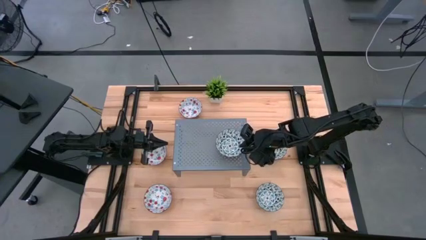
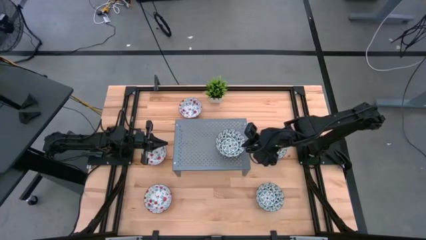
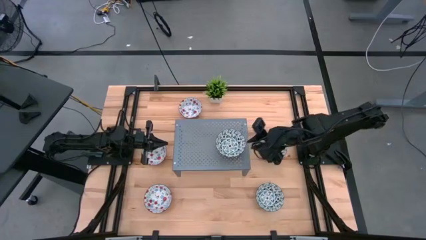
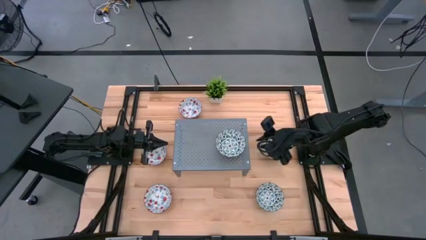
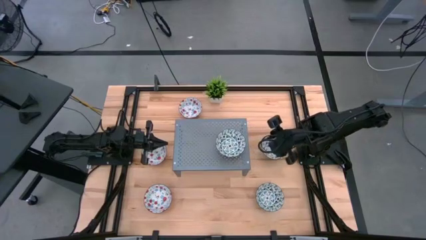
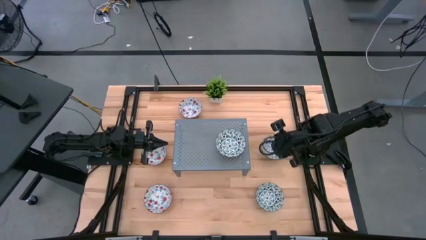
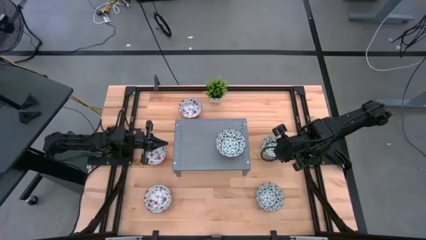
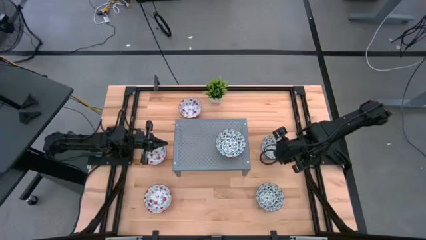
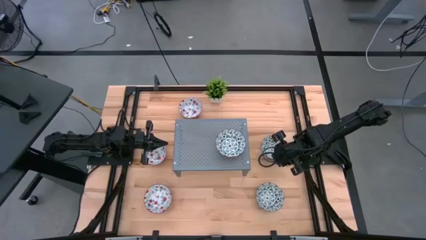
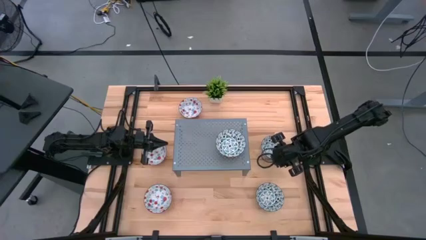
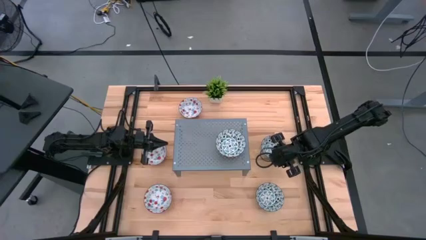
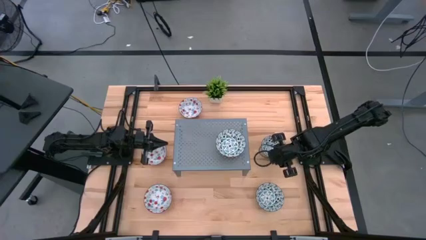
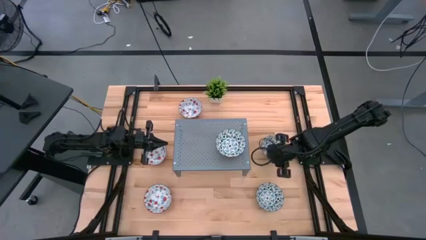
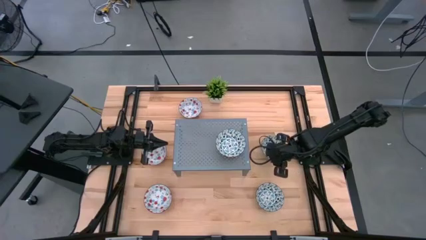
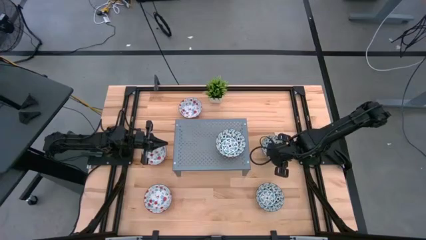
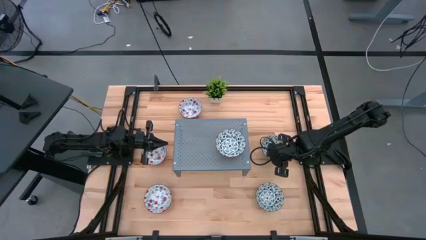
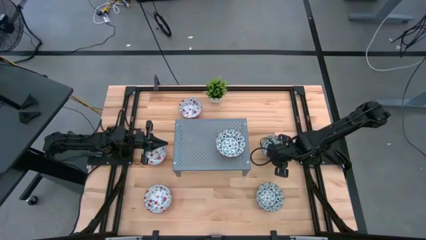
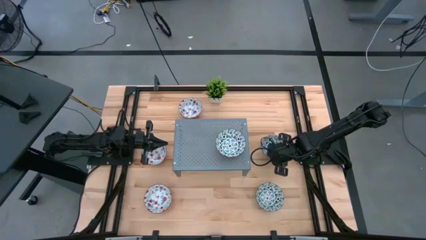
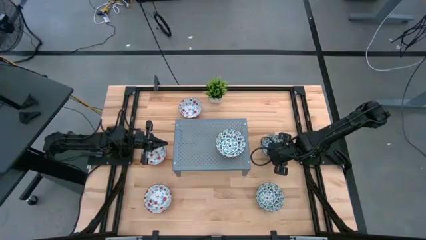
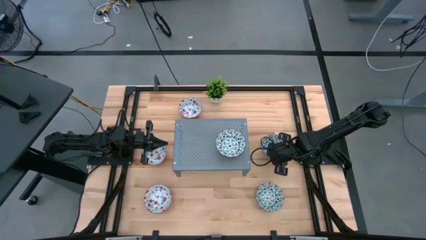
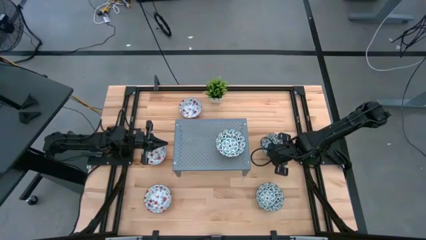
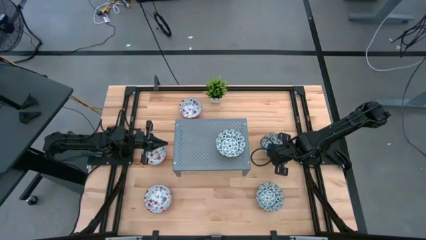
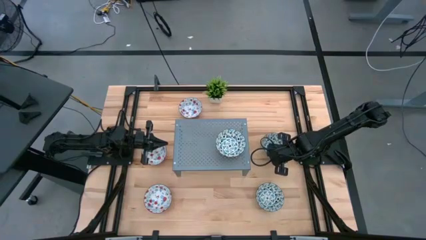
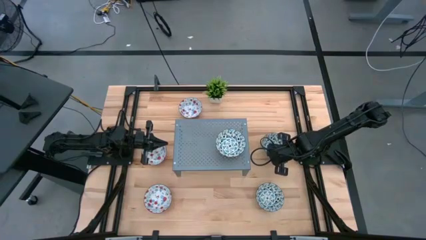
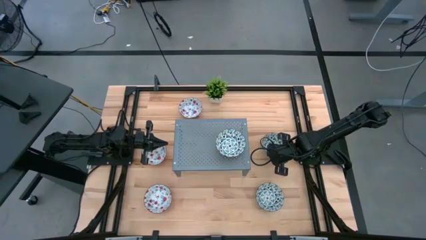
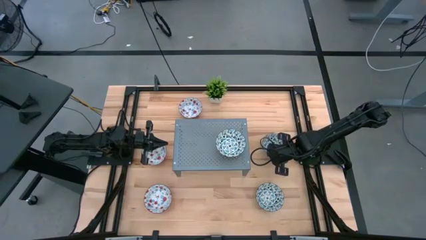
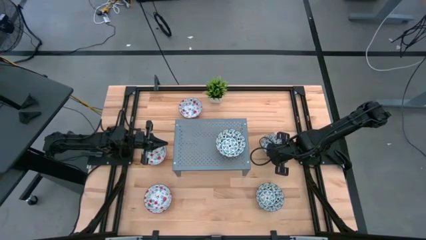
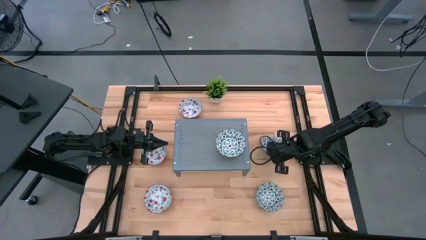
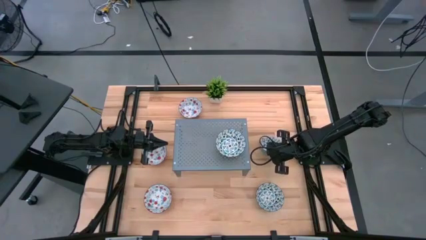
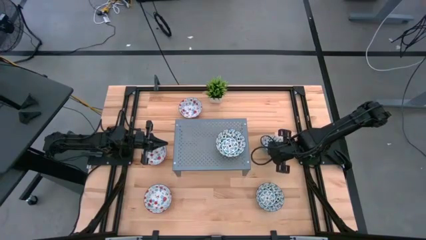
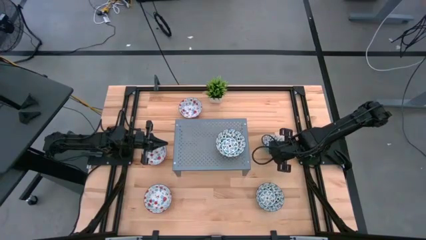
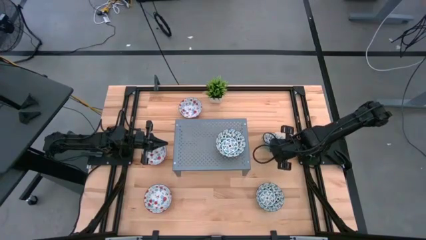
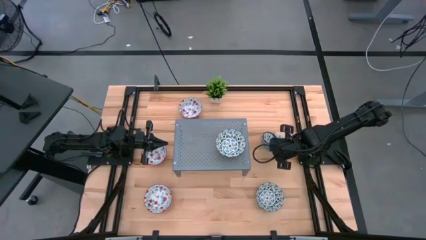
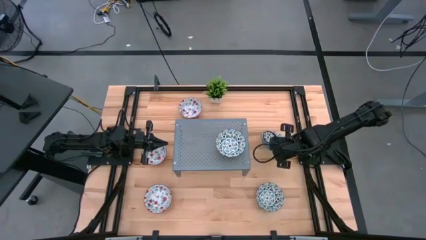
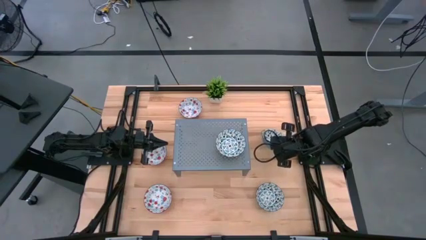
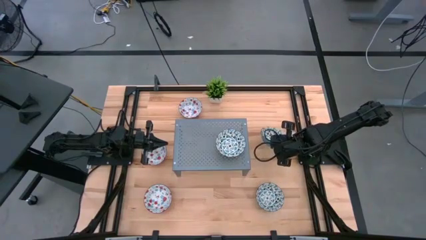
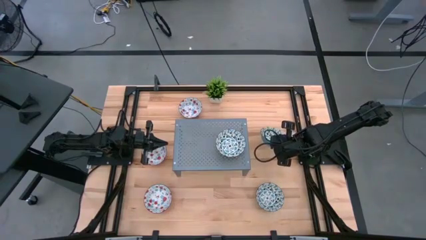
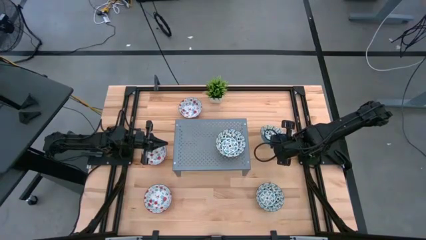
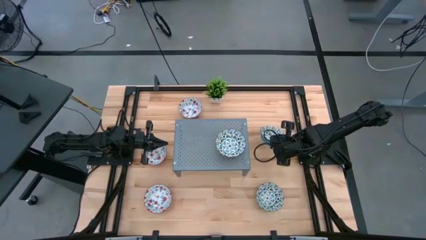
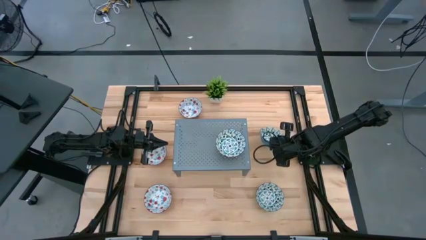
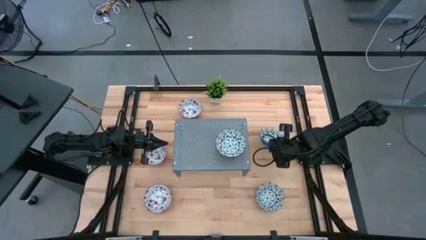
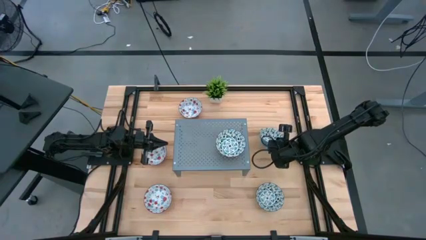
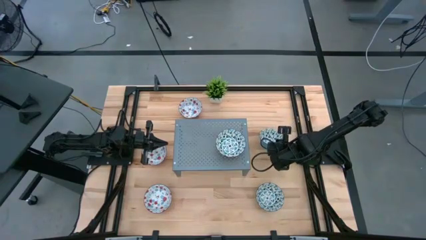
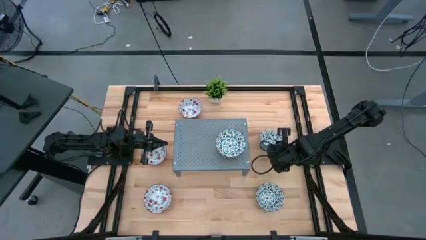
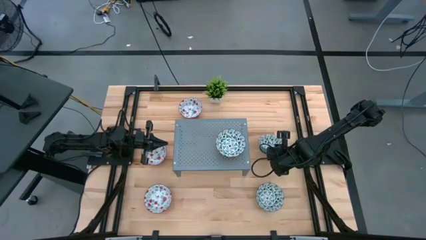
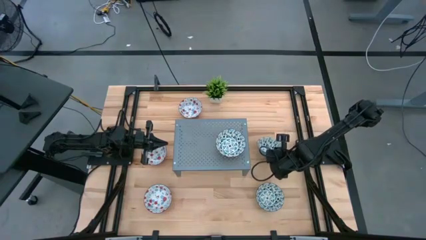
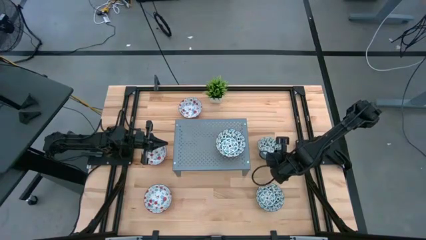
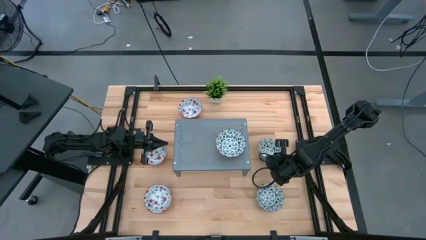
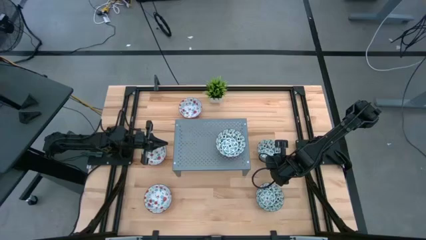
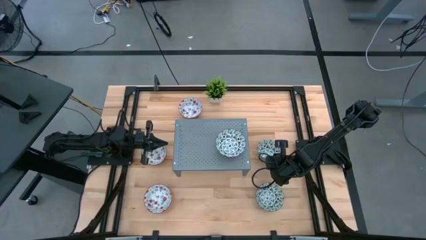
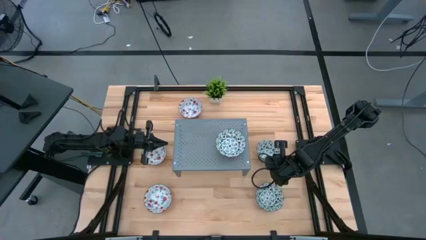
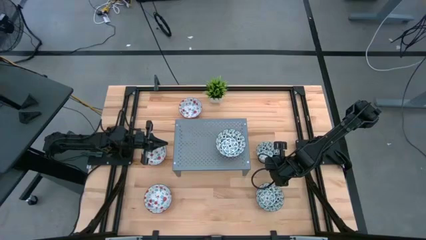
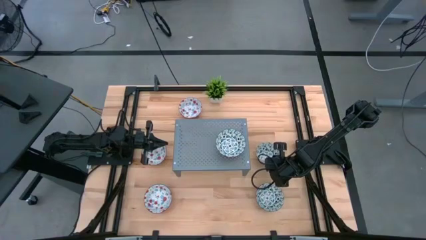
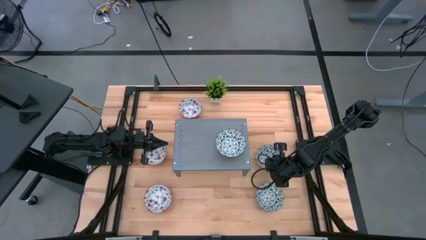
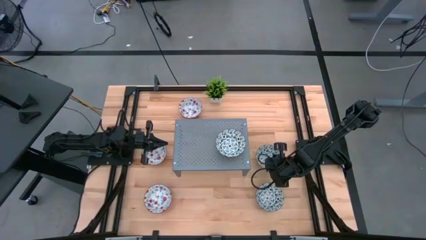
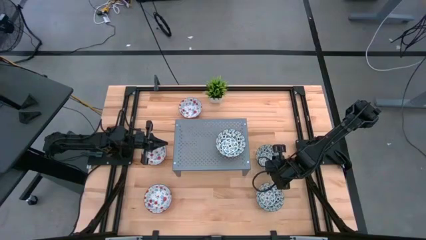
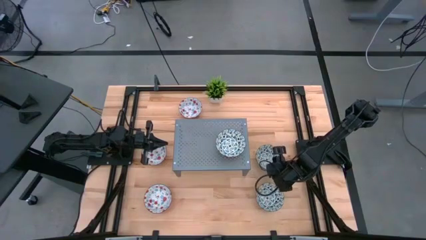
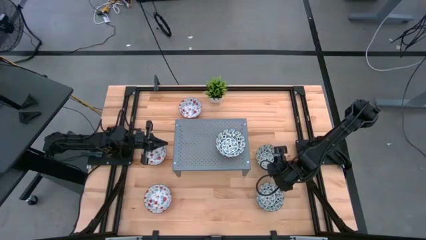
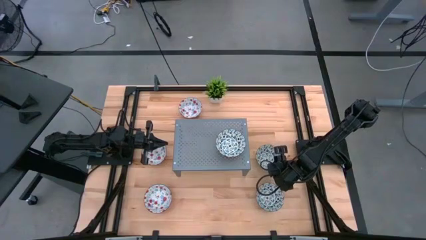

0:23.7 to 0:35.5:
Task: Pick & Place Mini bowls
Stack the top blue patterned bowl on the other blue patterned bowl on the shelf
